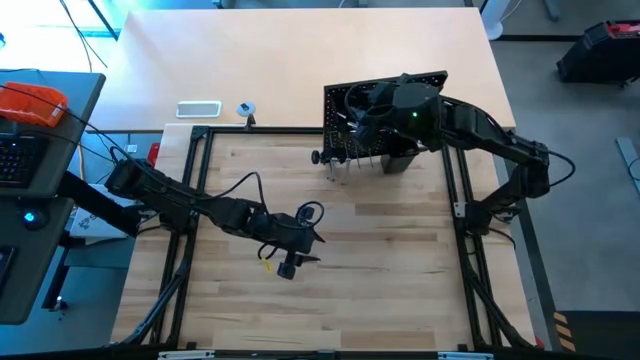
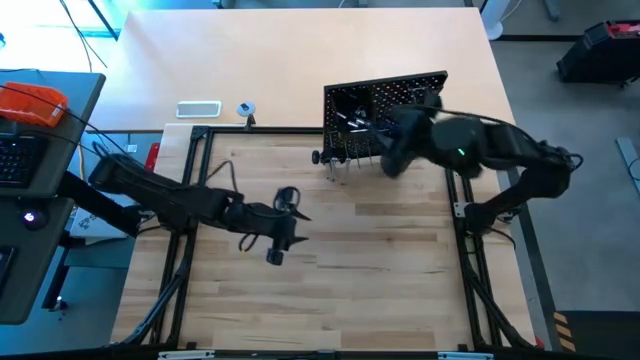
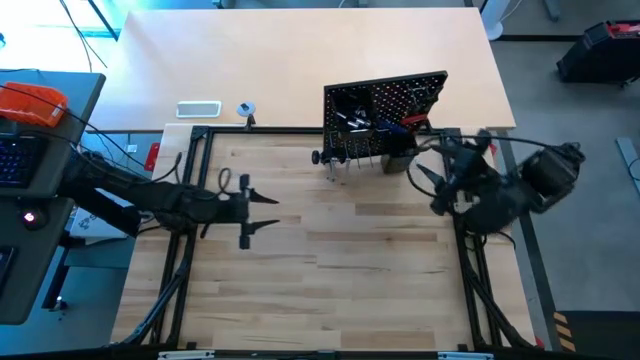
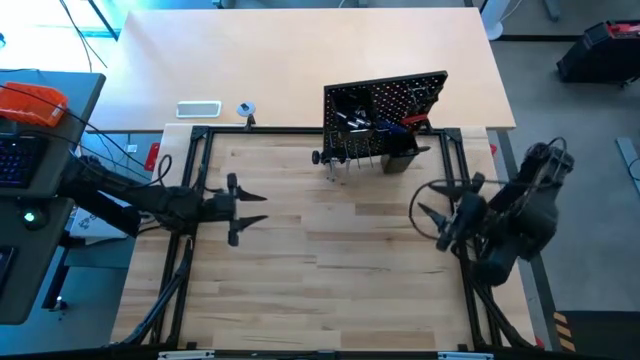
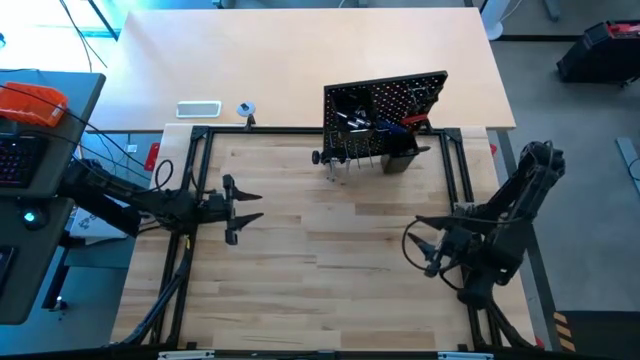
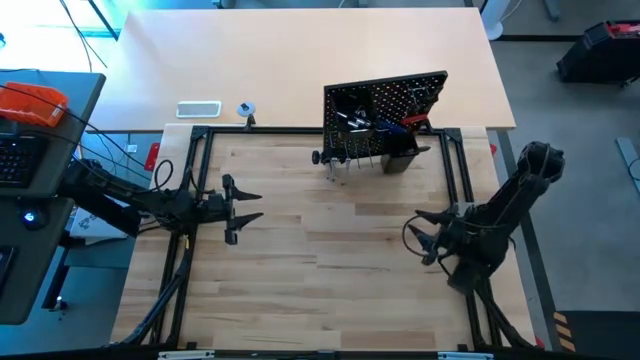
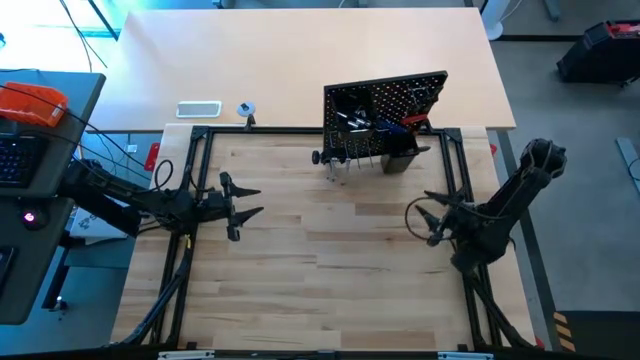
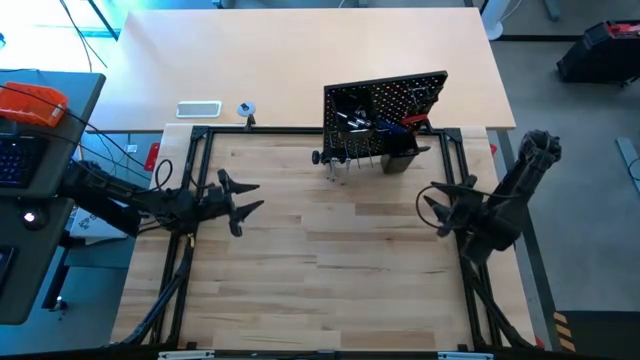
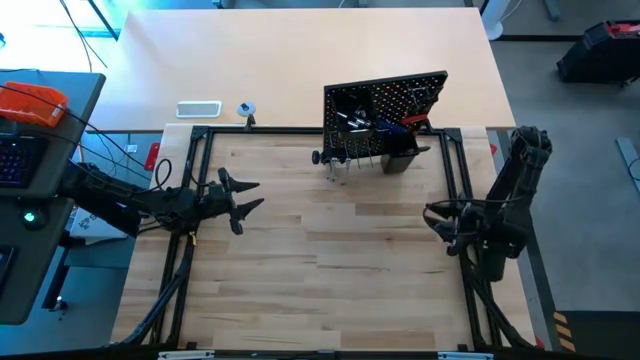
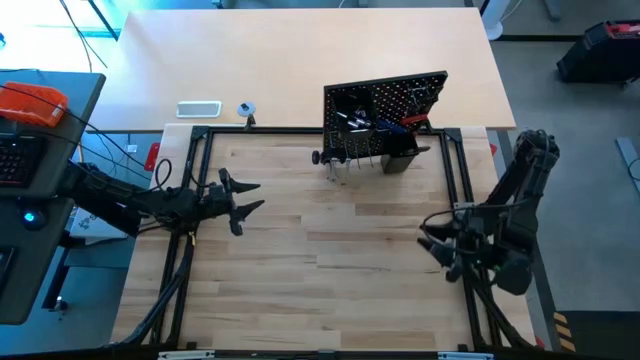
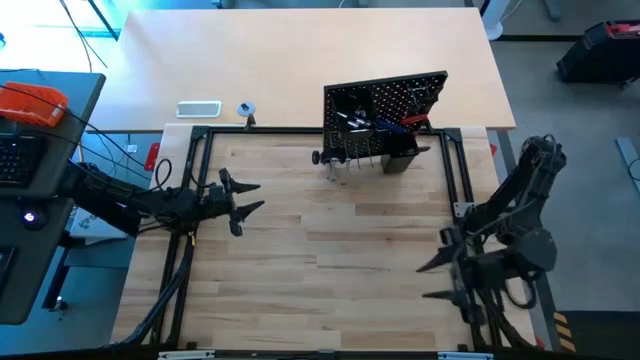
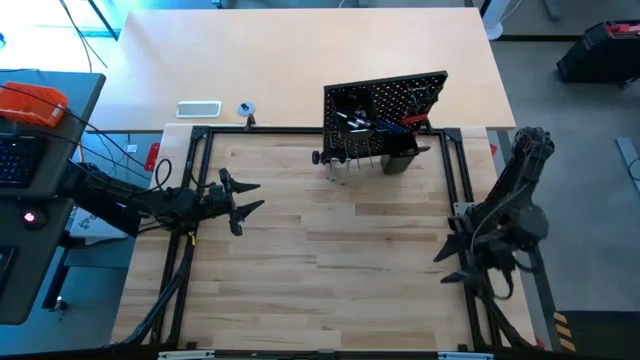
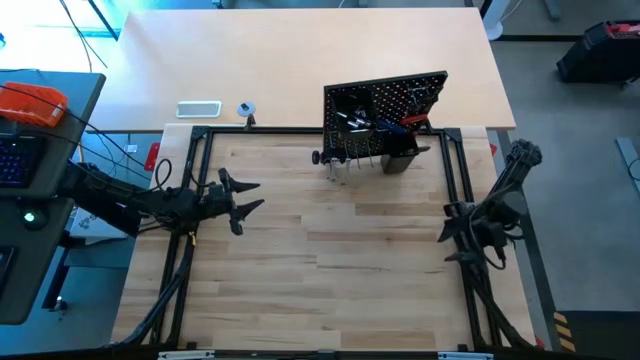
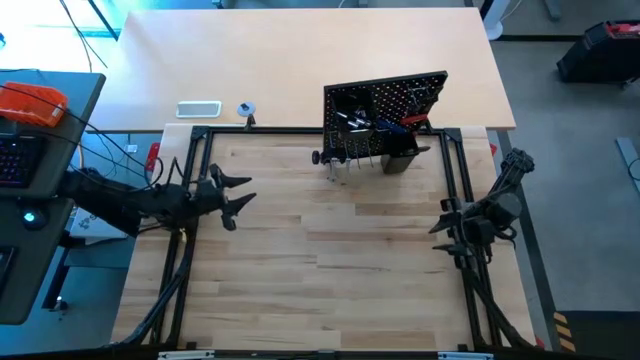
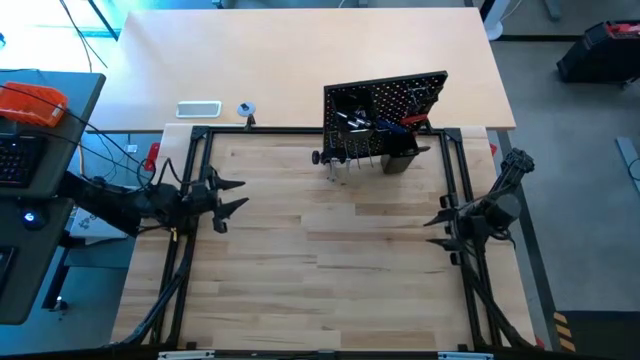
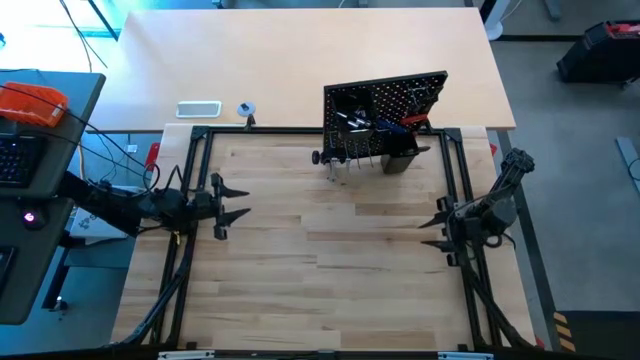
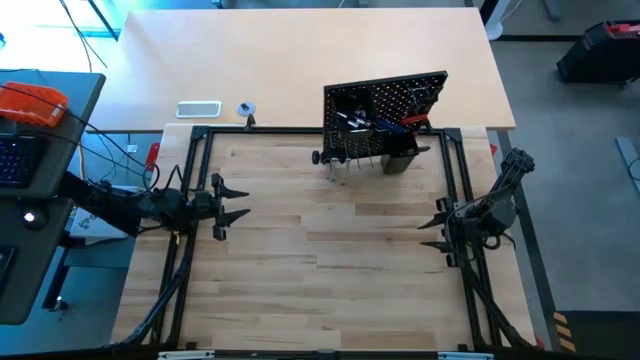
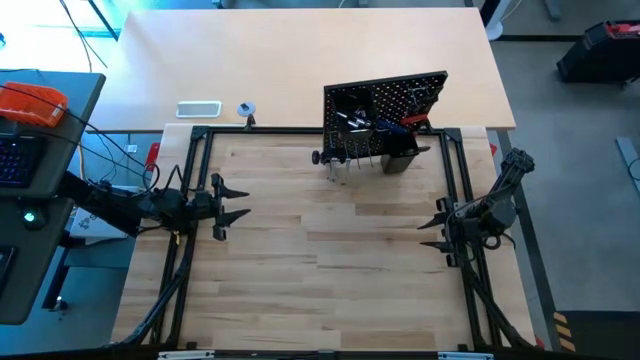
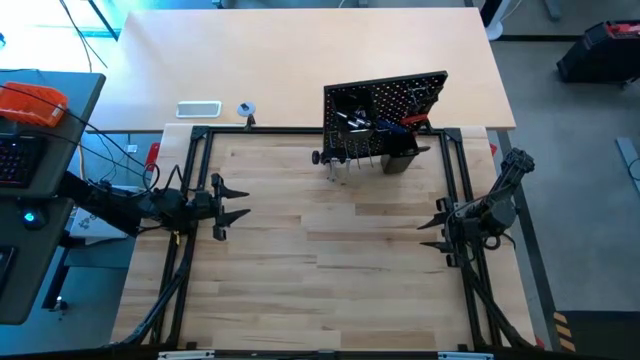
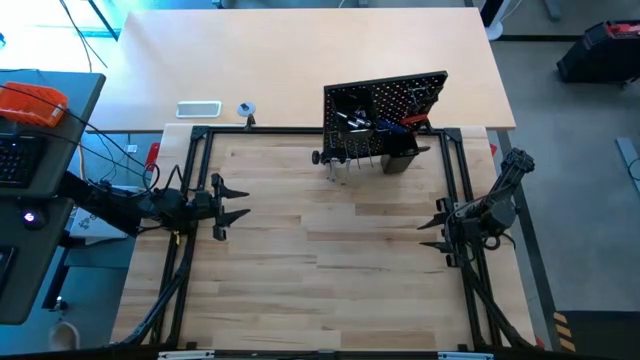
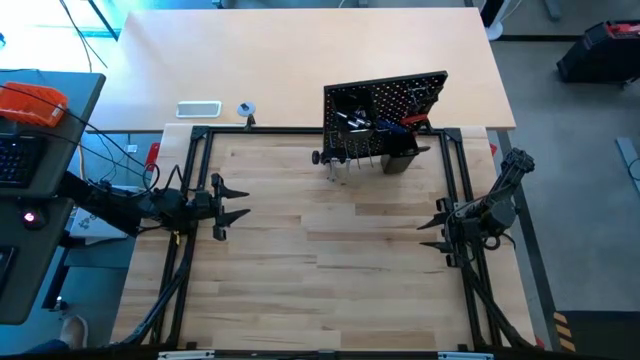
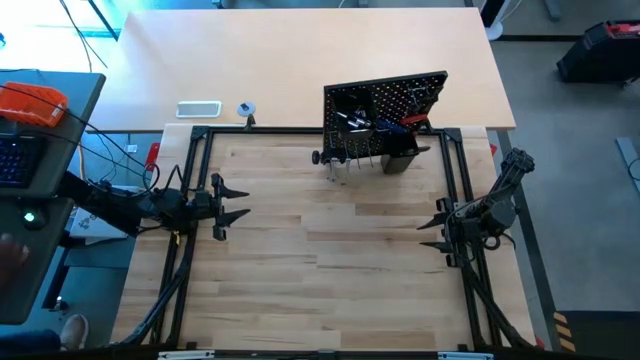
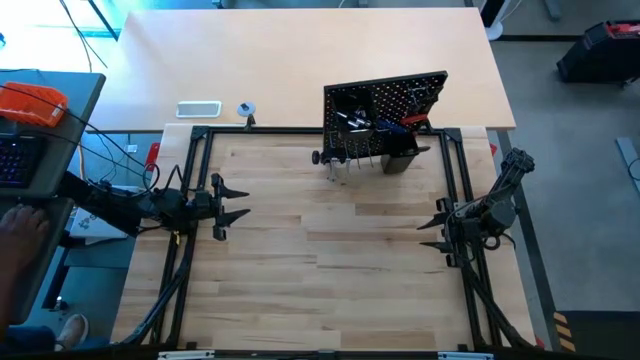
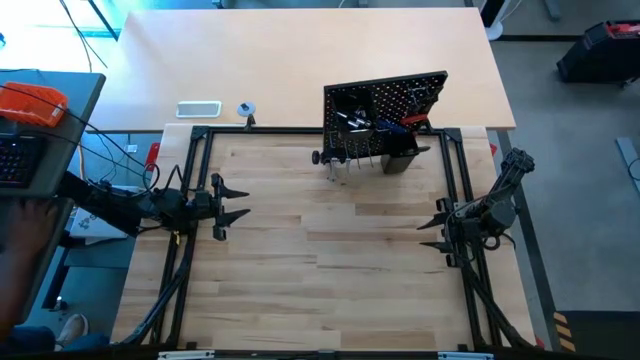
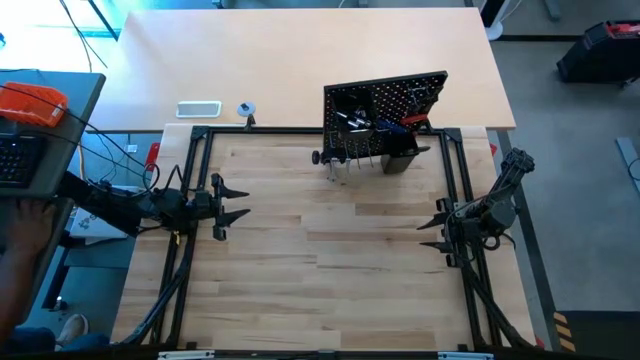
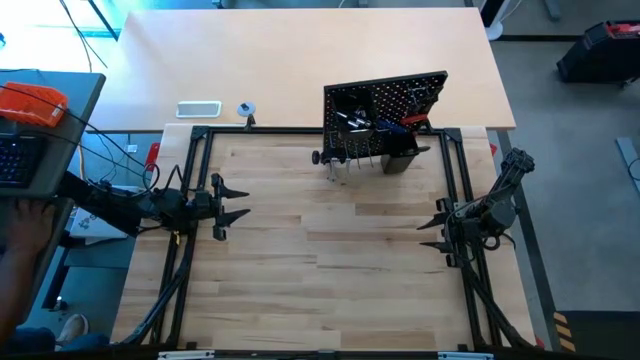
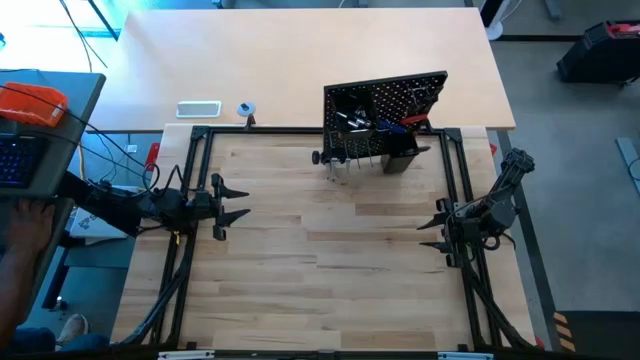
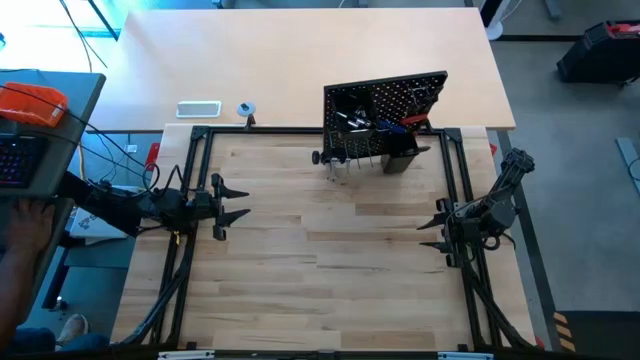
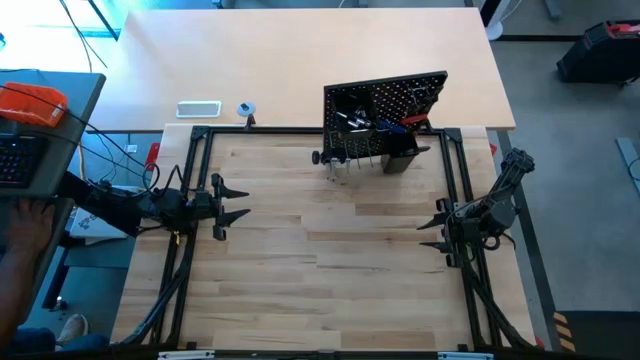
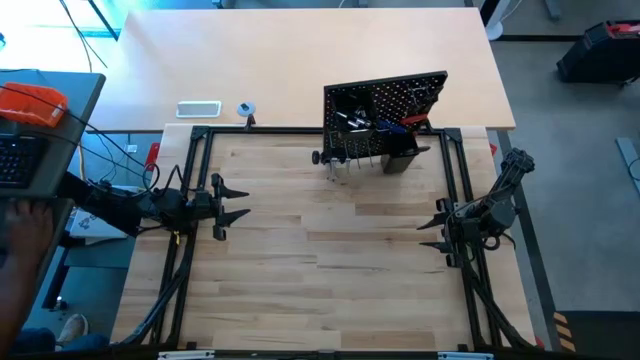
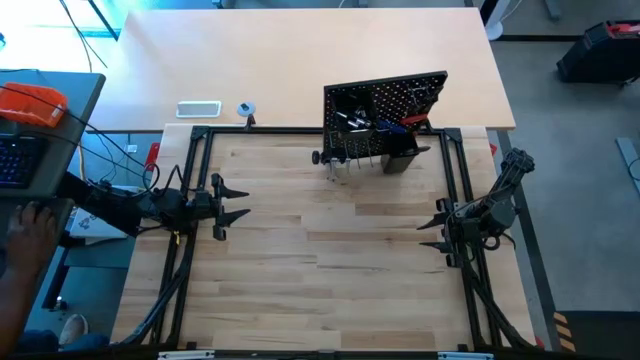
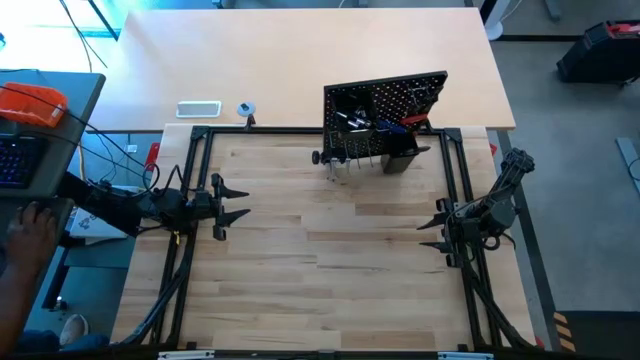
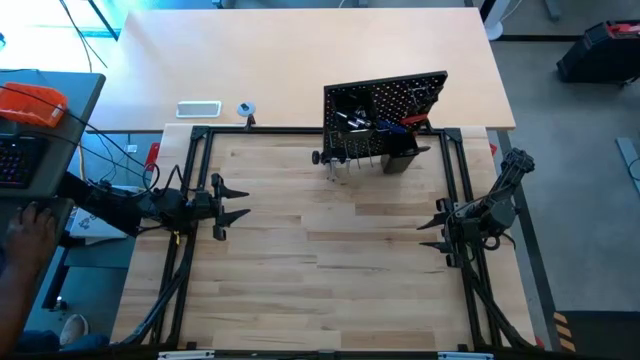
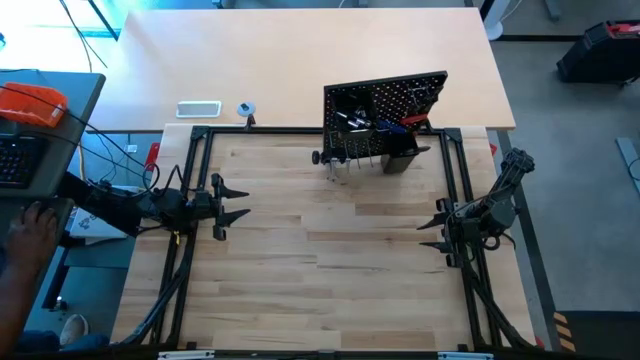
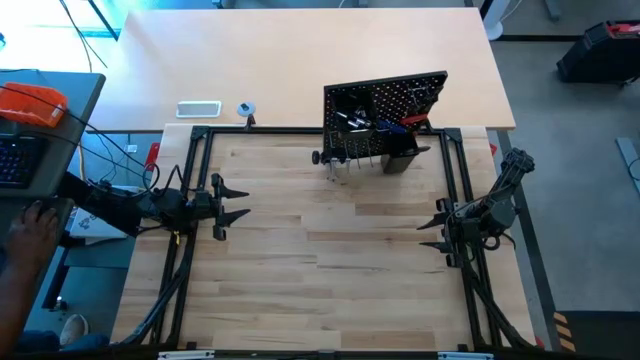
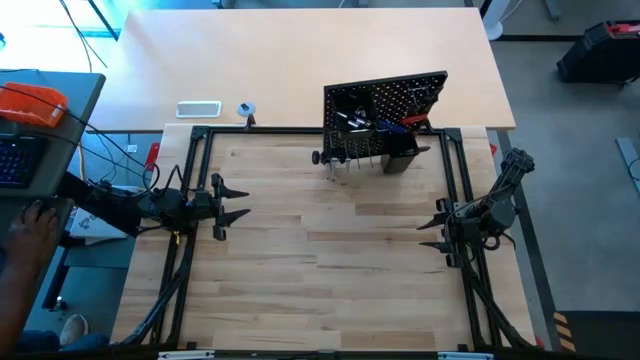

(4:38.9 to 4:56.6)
Task: Hang tools onto peg board
Return to Home Position

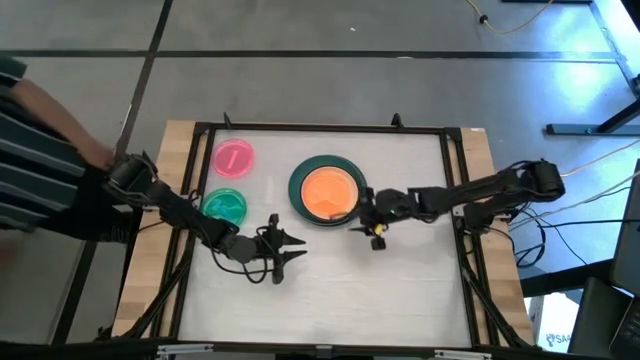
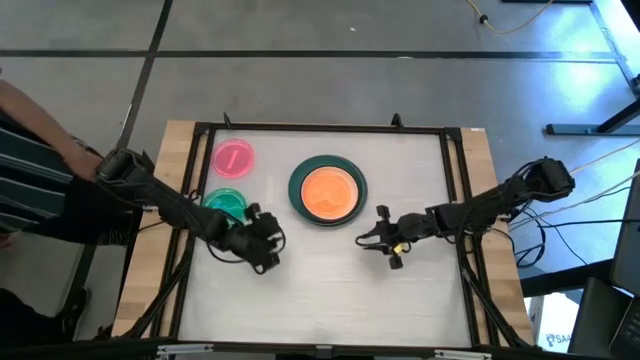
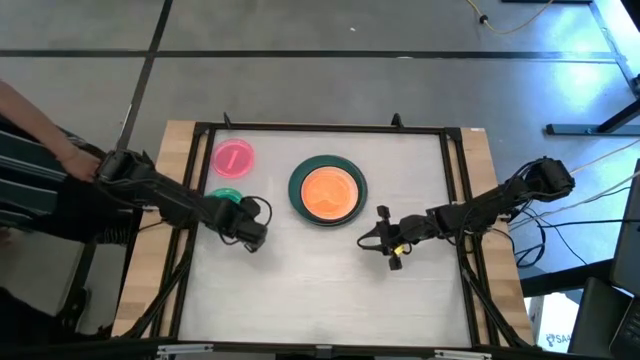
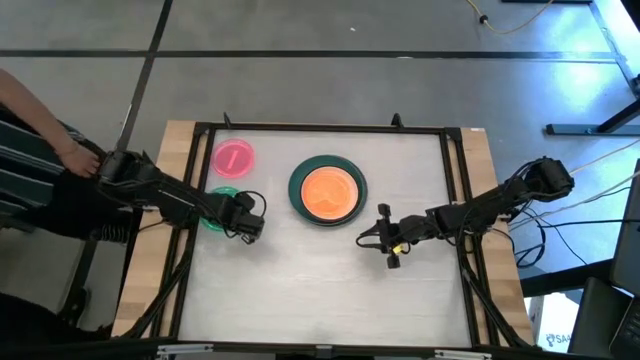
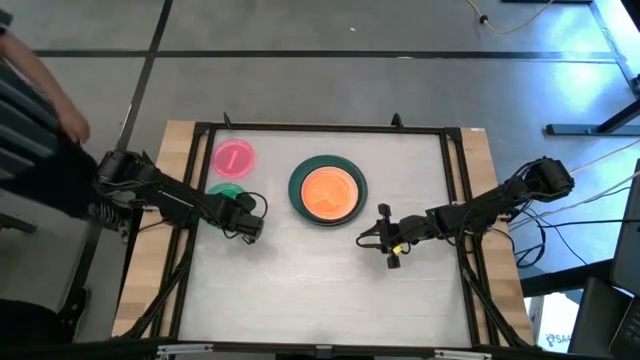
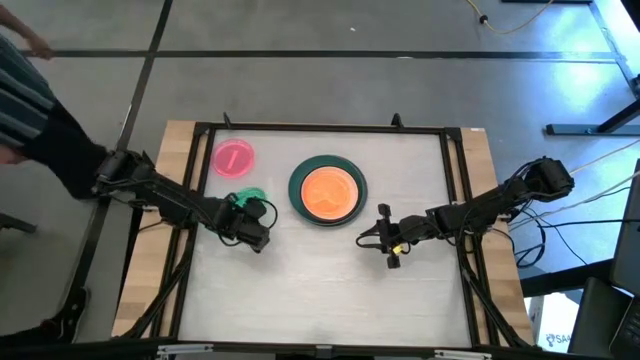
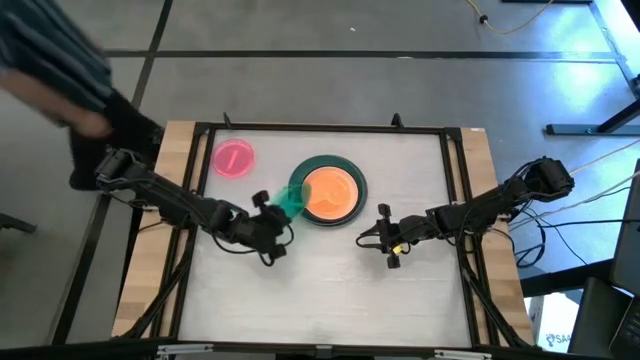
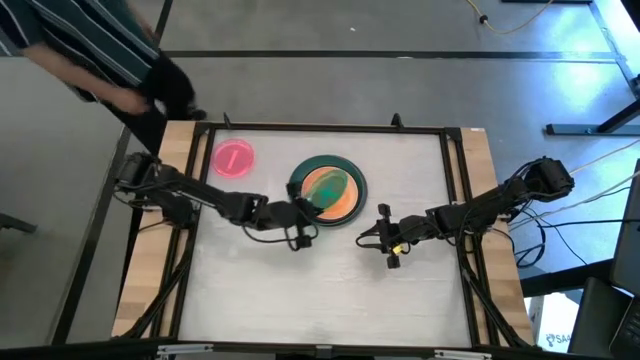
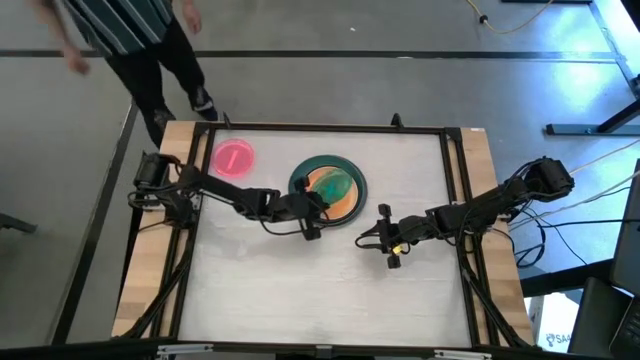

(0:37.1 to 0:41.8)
Task: Stack plastic plates
Stack the light green plate on the light orange plate
